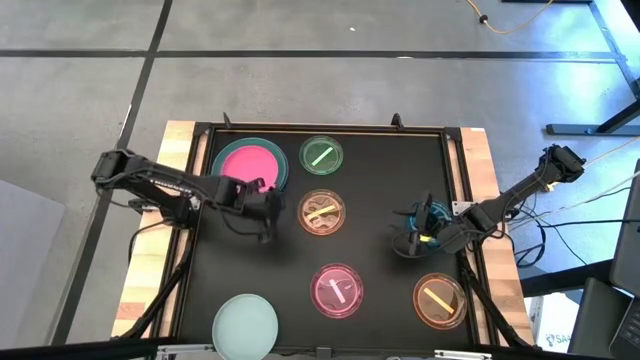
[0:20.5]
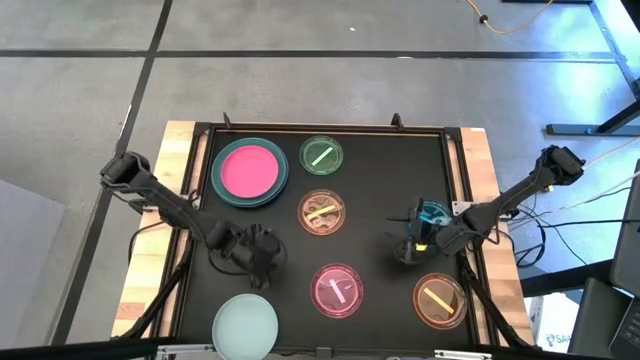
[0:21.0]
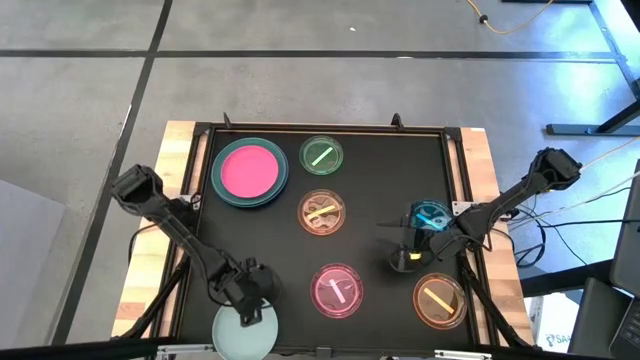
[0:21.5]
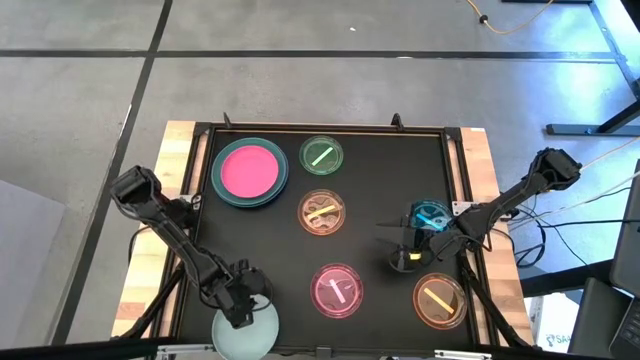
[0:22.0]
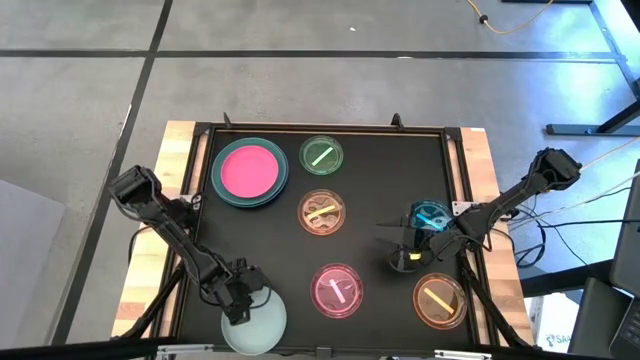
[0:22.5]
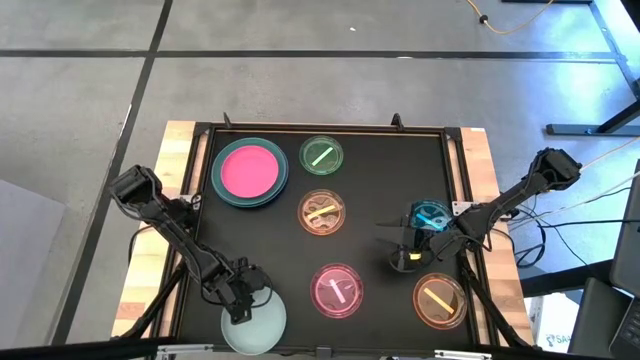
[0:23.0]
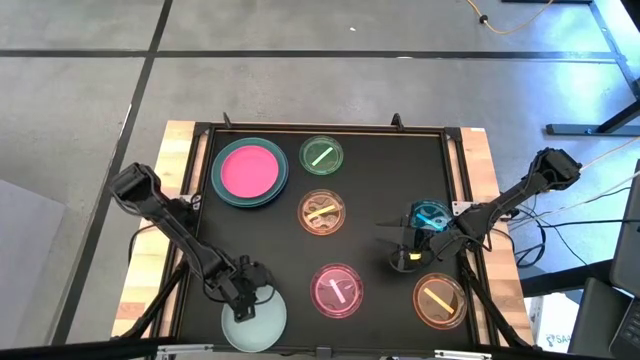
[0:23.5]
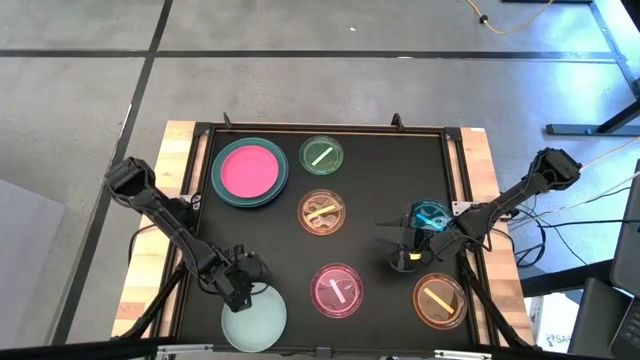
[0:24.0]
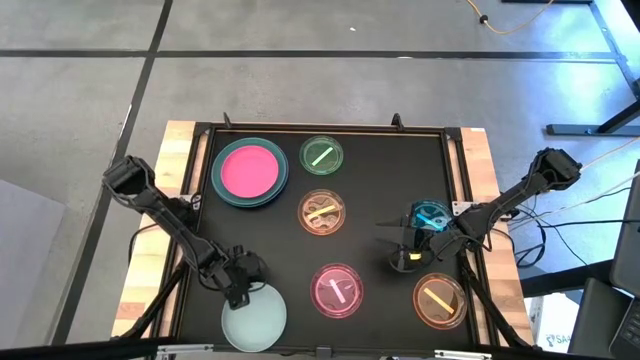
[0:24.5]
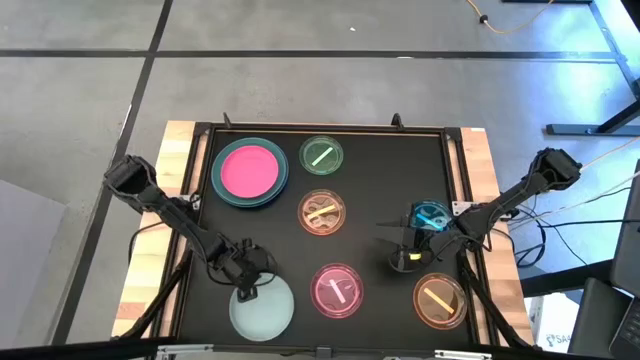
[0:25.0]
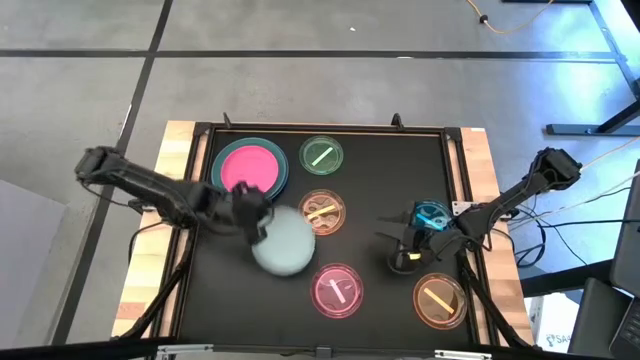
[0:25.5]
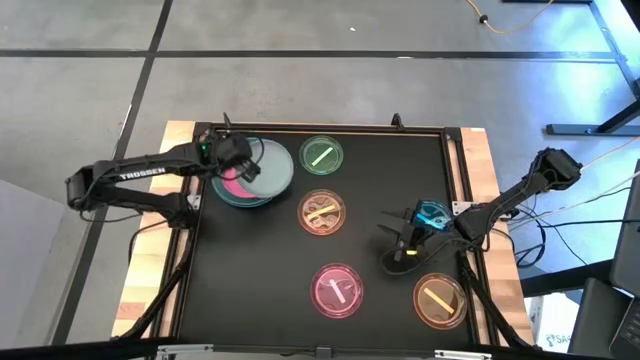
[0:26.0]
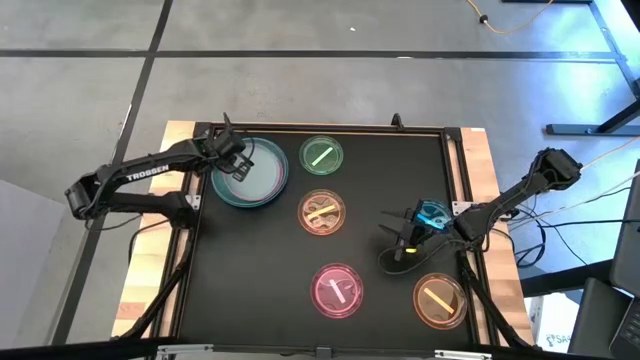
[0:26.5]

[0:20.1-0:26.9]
Task: Stack plastic plates
Stack the white plate on top of the pink plate on the table

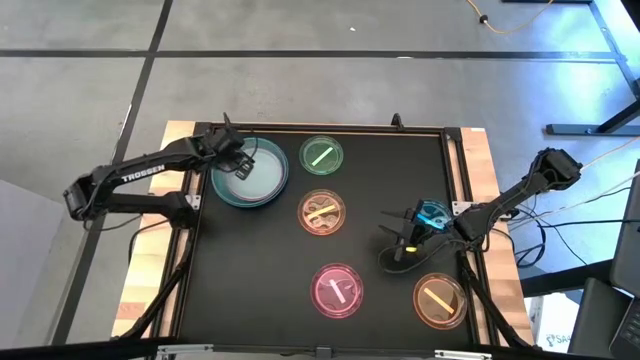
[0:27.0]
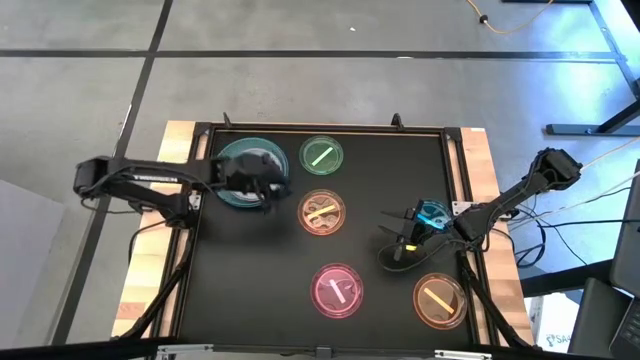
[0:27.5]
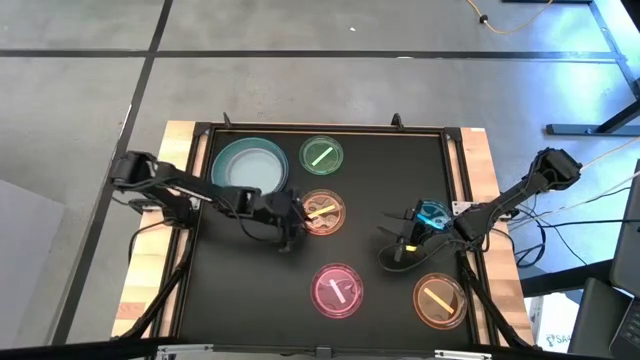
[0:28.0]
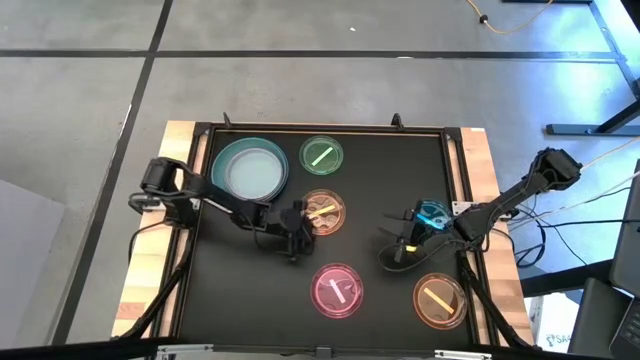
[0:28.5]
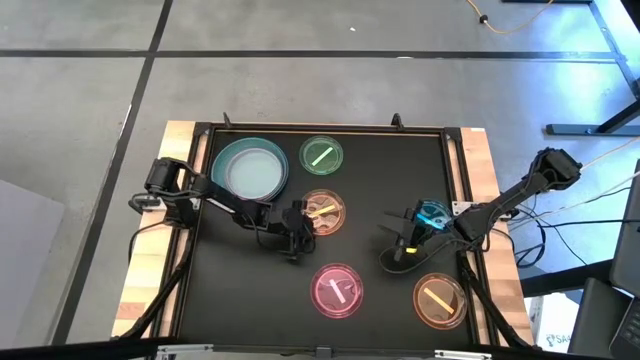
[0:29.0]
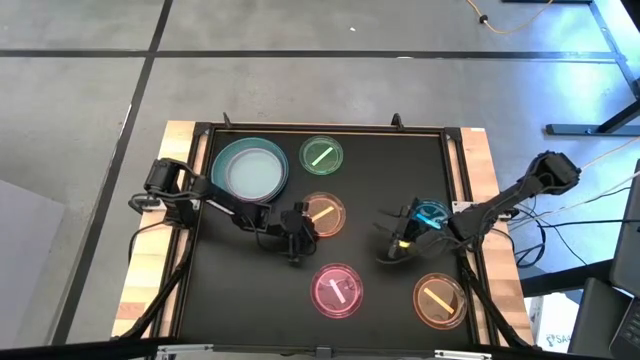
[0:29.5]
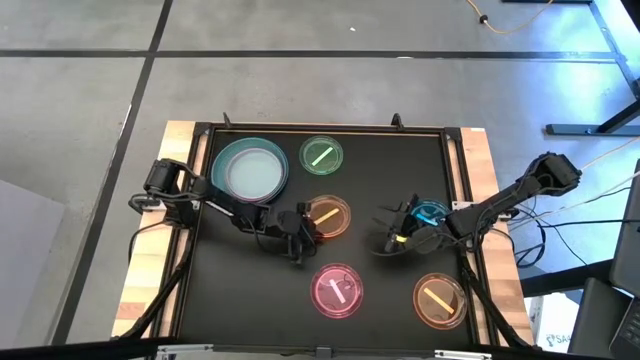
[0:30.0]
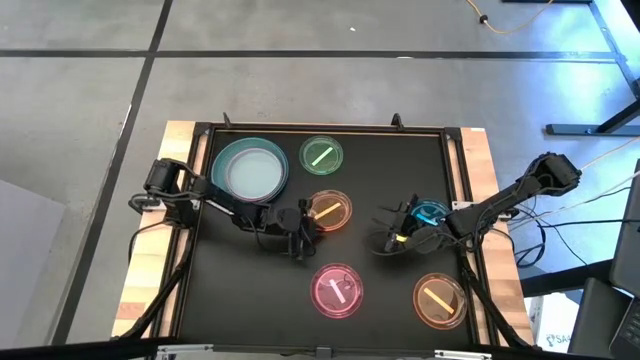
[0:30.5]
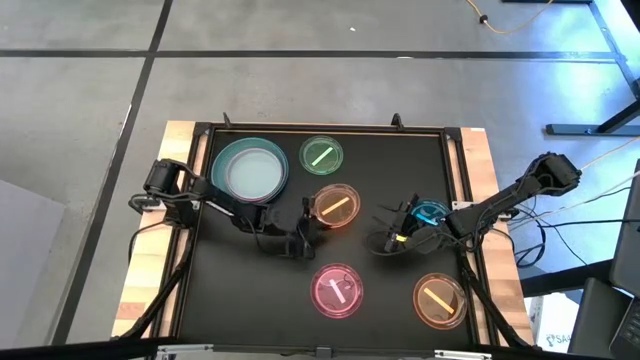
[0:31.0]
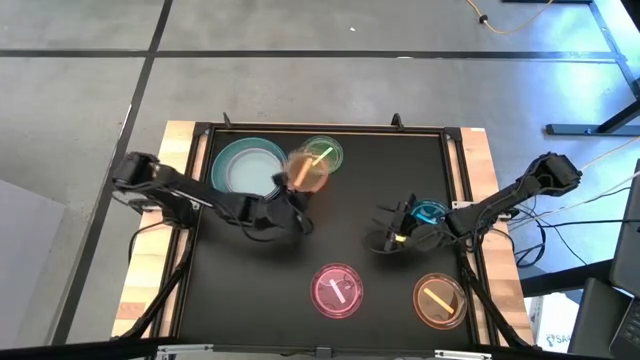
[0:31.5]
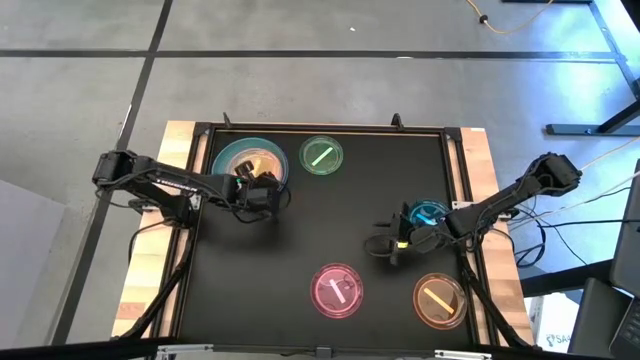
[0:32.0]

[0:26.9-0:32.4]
Stack the top transparent orange plate on top of the white plate on the table

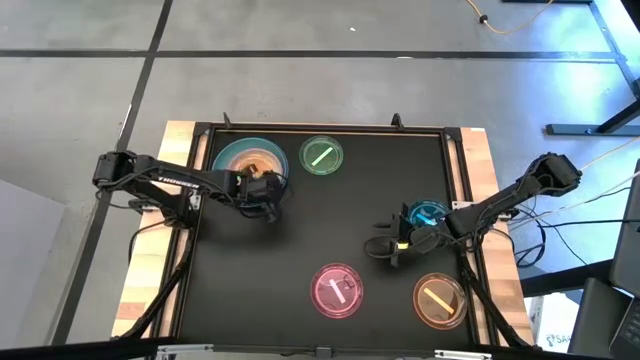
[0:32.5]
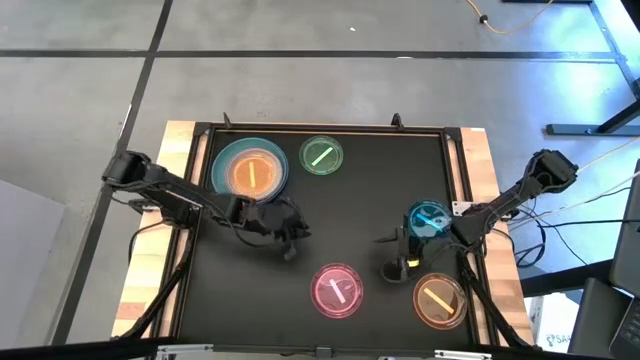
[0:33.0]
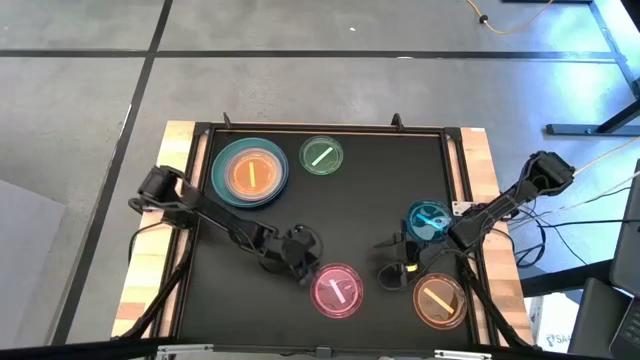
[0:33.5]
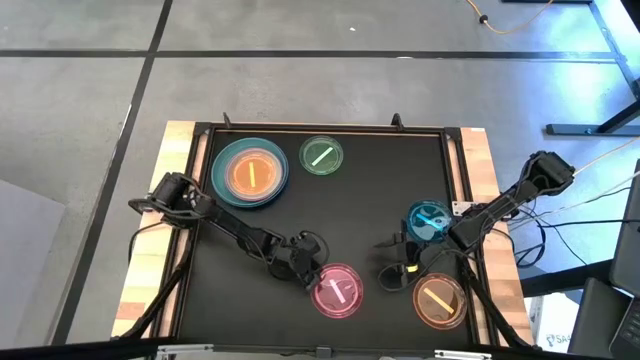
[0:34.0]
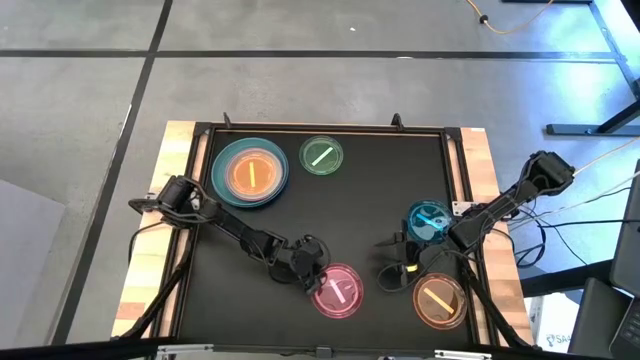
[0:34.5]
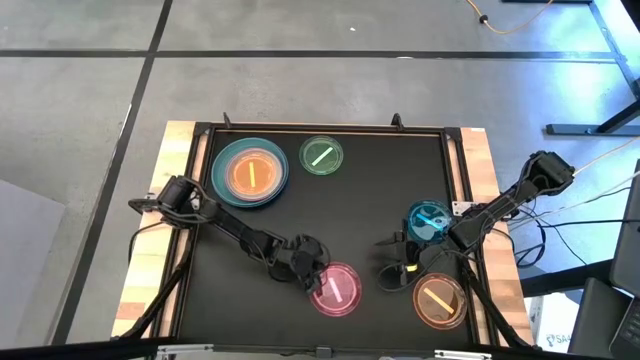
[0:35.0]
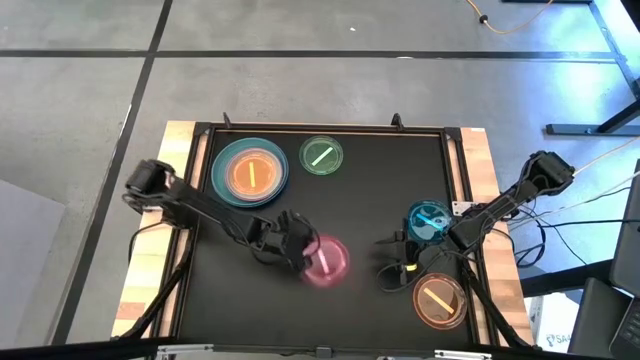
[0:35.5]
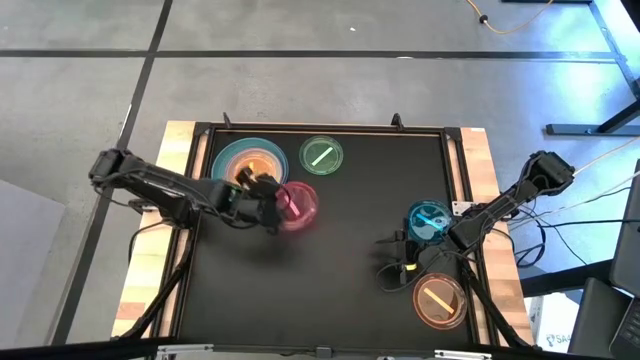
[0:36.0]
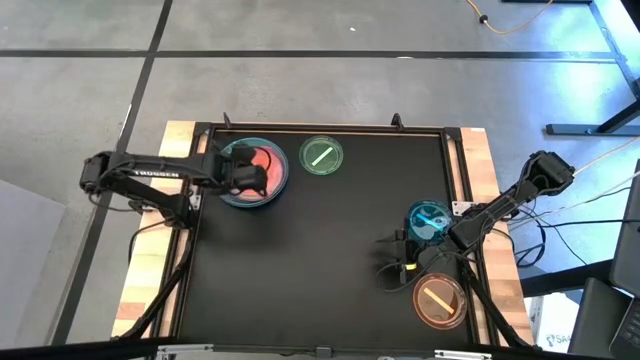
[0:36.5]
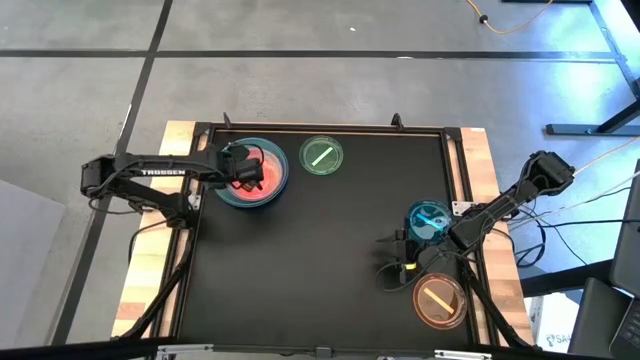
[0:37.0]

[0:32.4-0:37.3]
Stack the transparent red plate on top of the transparent orange plate on the table

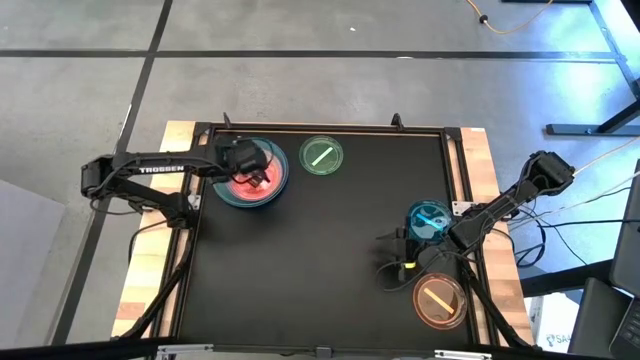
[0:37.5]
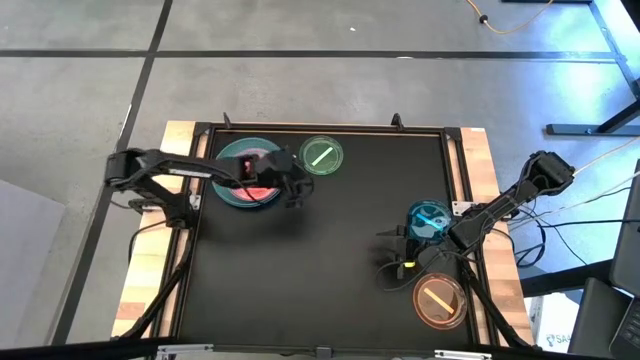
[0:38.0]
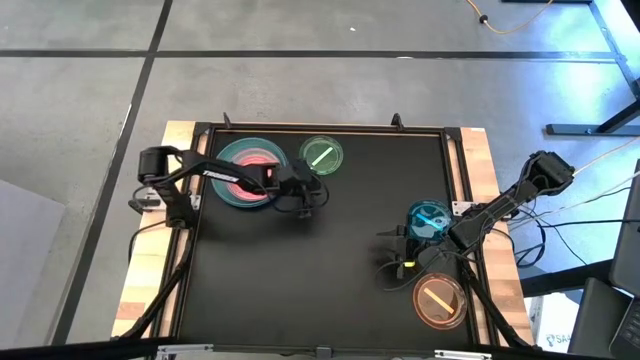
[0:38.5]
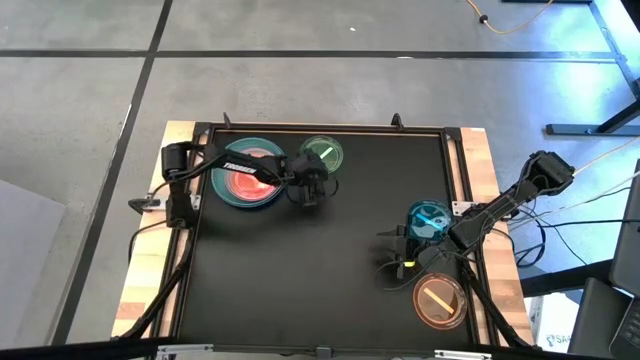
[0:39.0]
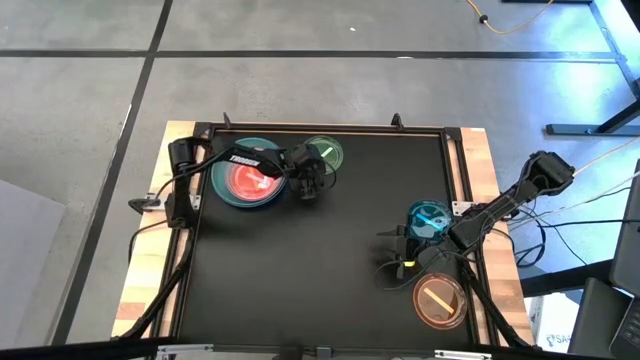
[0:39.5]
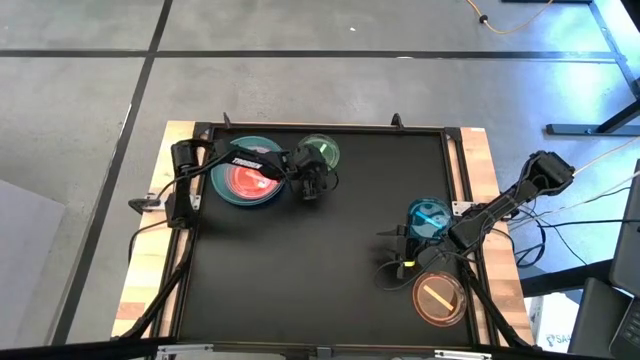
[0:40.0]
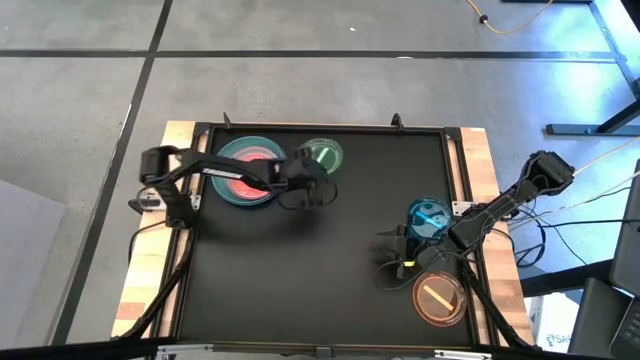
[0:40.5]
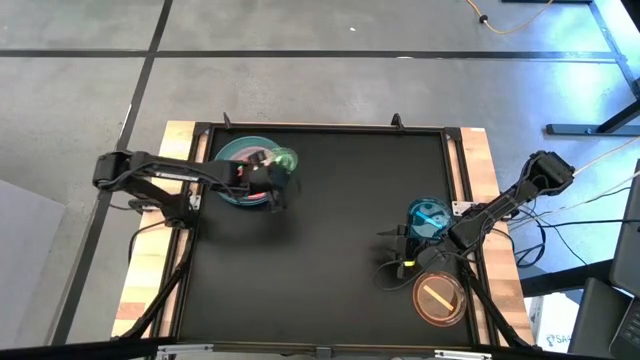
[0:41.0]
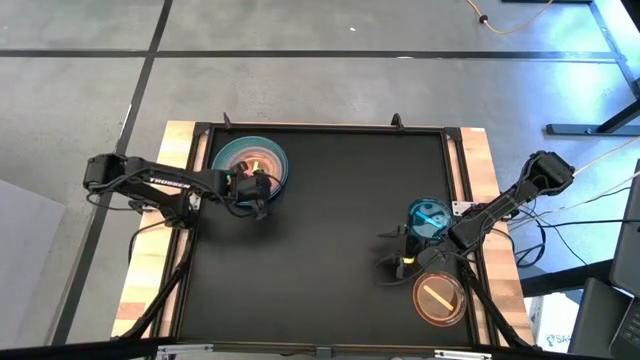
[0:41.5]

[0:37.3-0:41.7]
Stack the transparent green plate on top of the transparent red plate on the table
